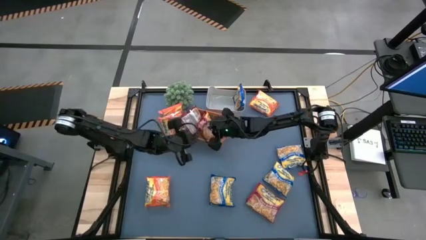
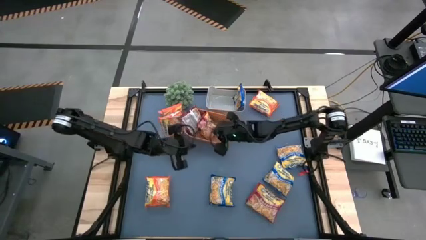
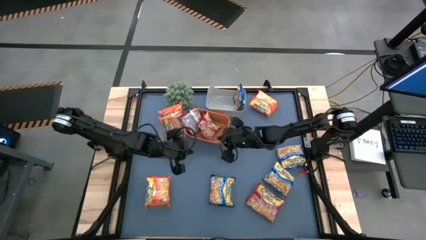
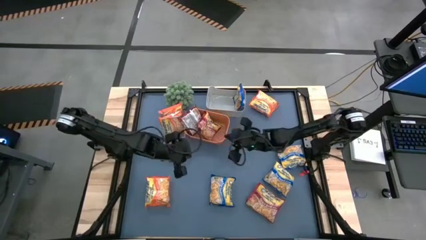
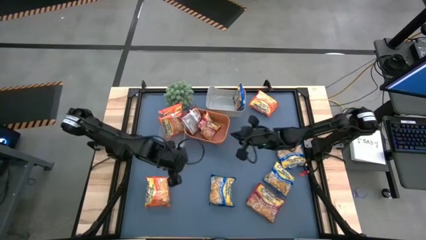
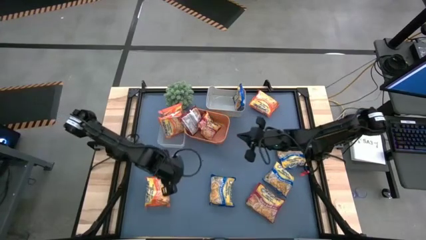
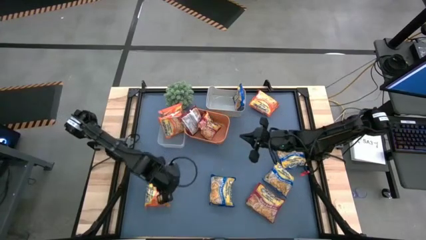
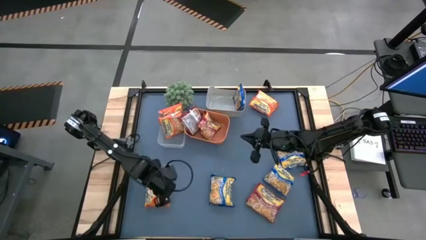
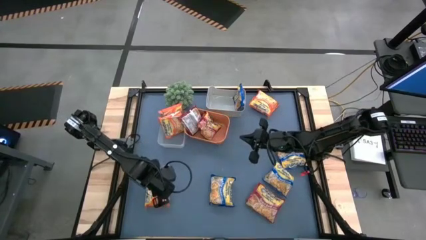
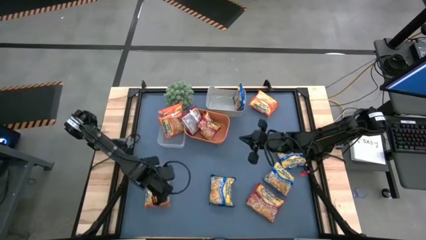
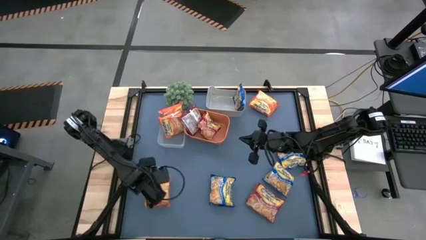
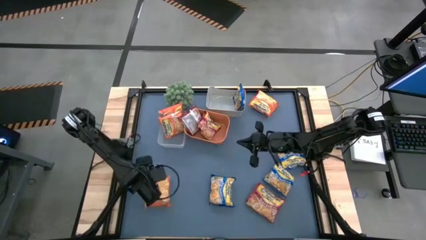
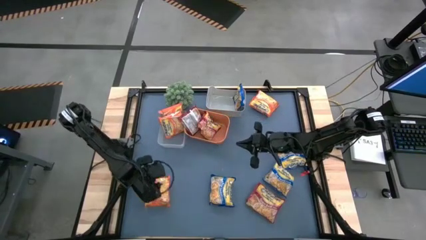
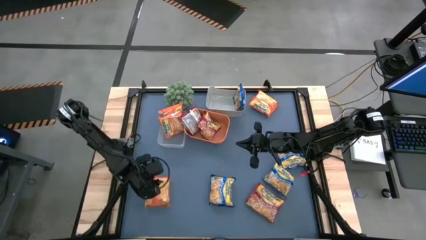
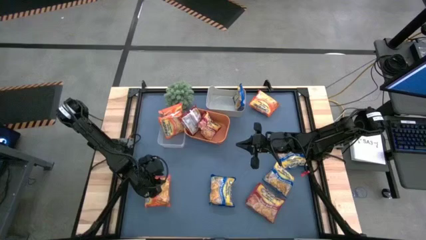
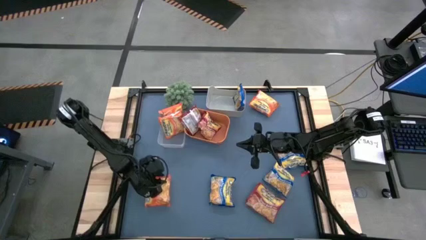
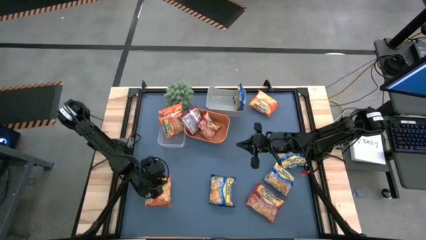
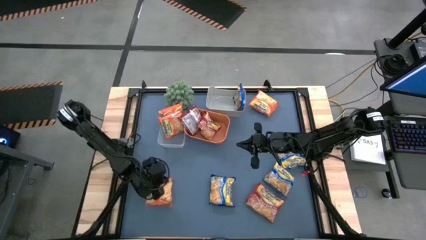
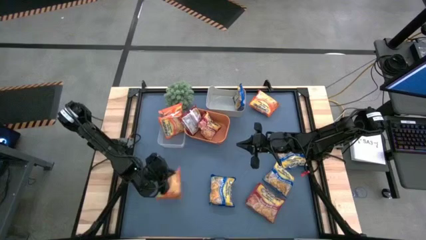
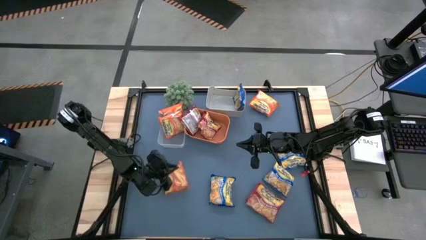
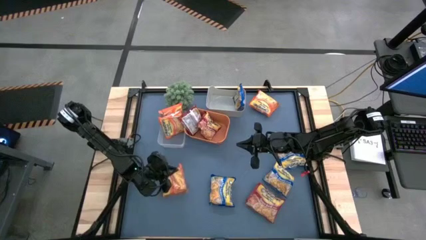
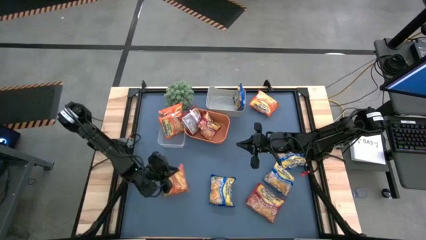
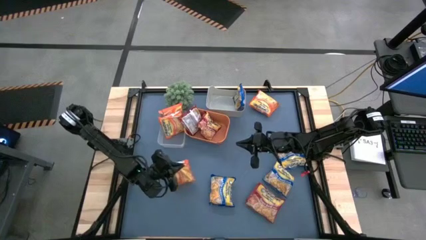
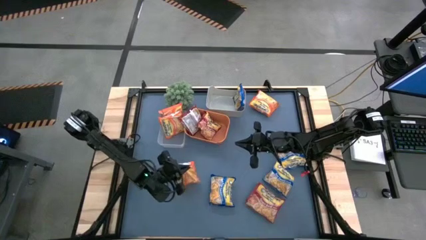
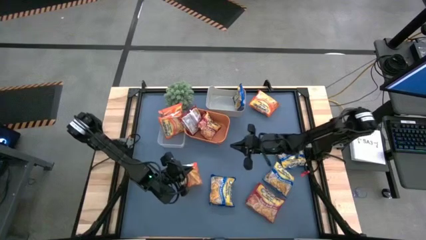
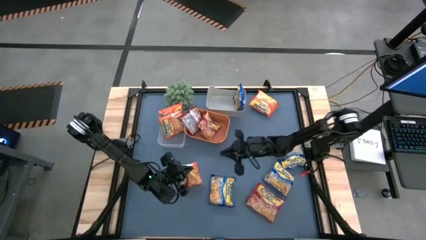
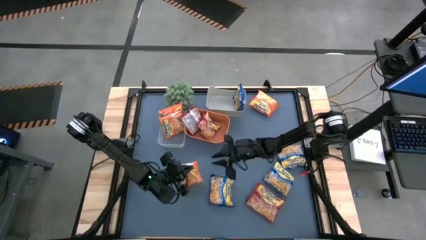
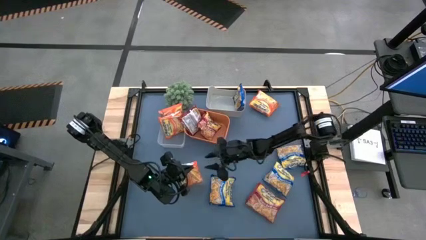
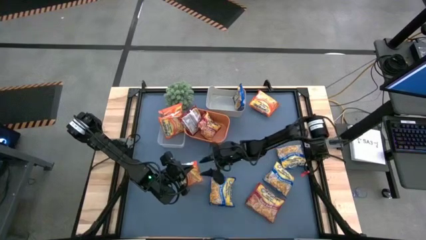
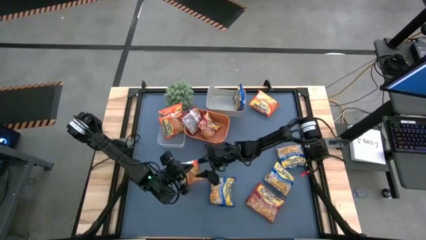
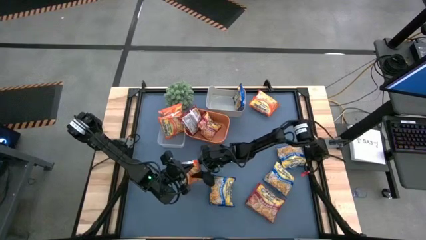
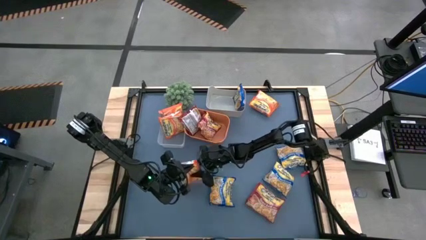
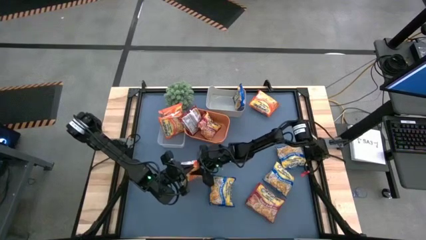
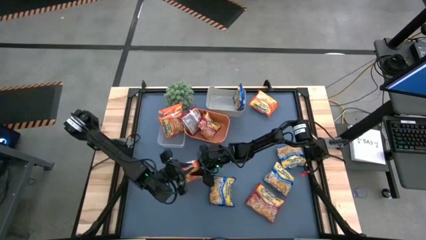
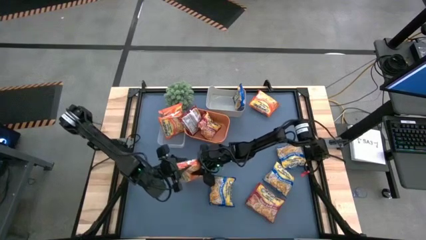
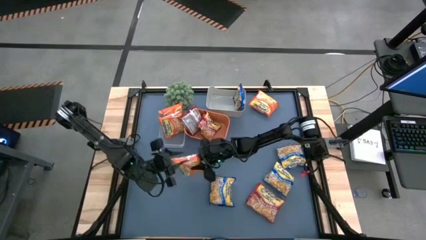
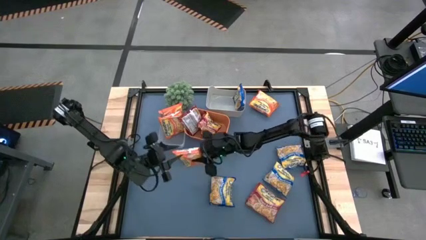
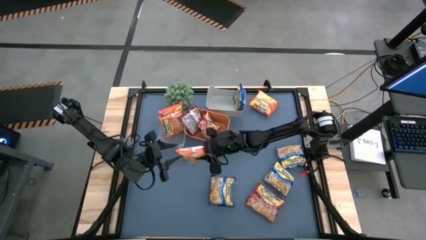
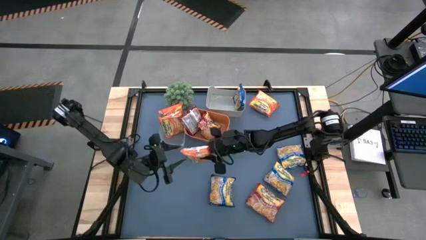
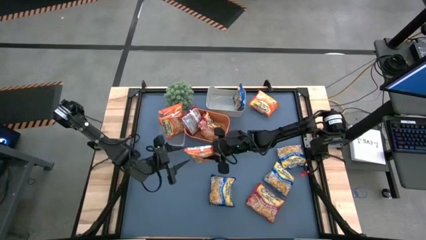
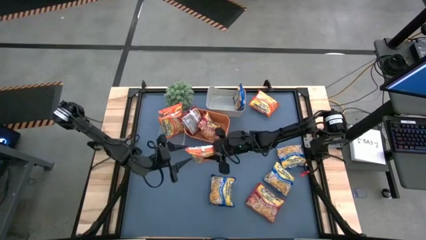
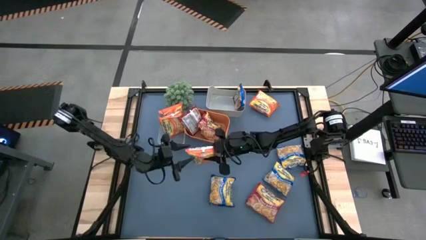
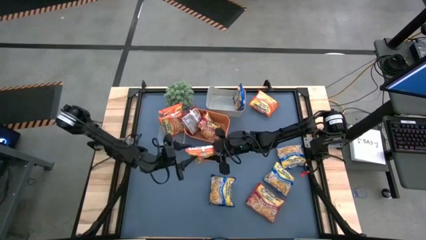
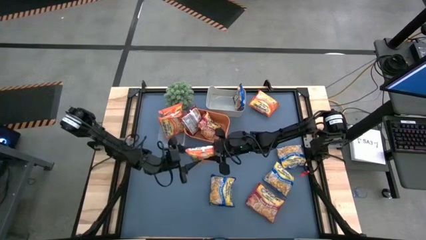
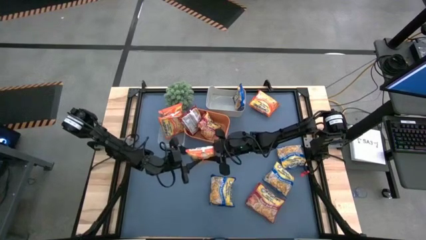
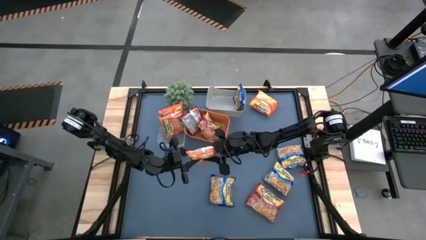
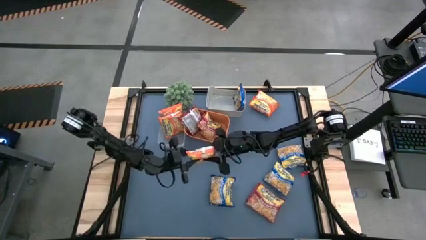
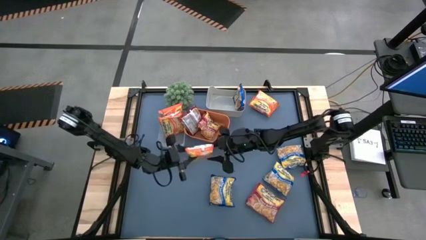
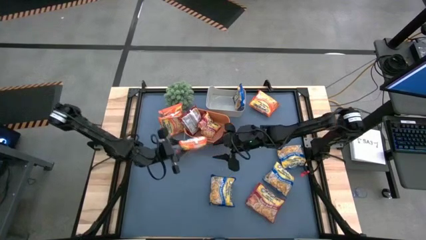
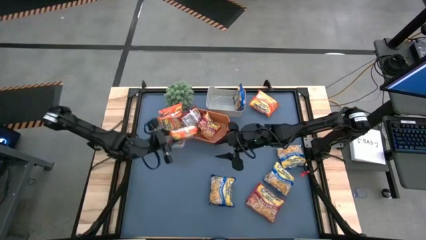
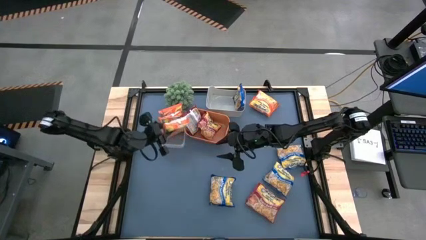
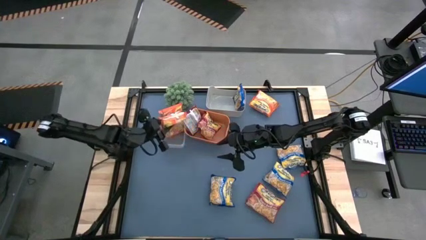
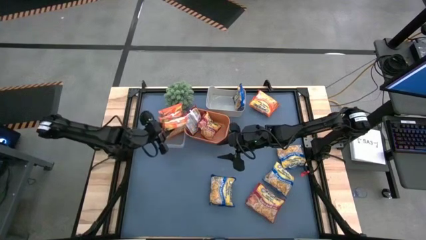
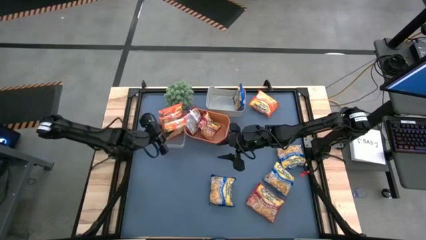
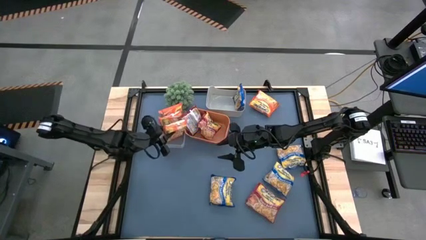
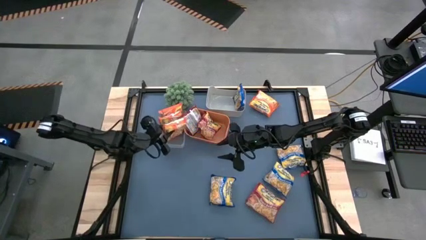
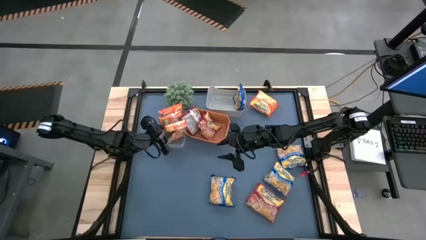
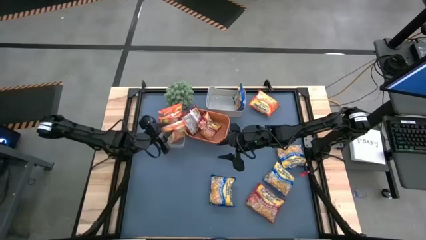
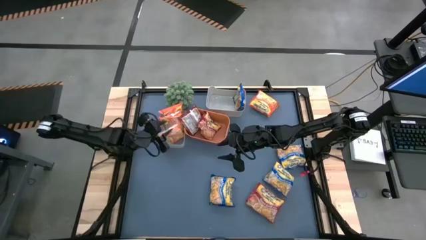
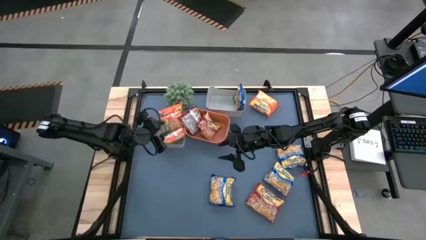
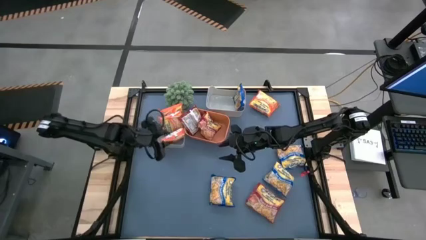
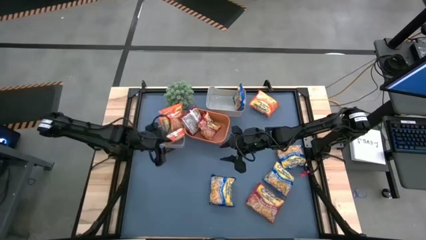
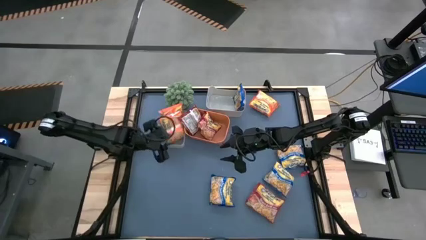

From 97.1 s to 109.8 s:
Task: Sort Maruchan noodles
Put the orange noodle pack into the orange bin

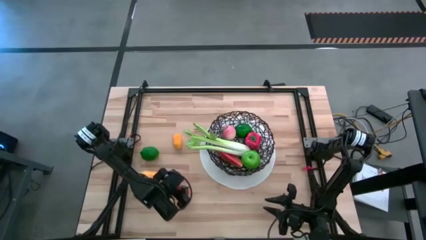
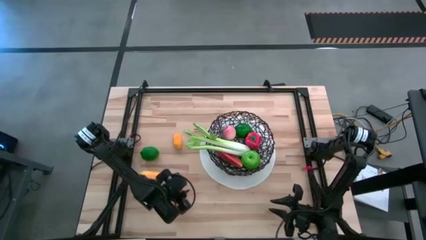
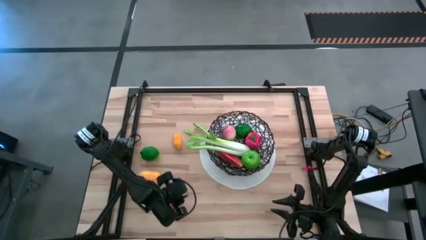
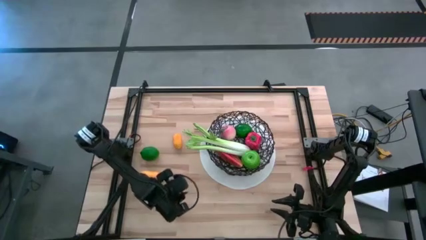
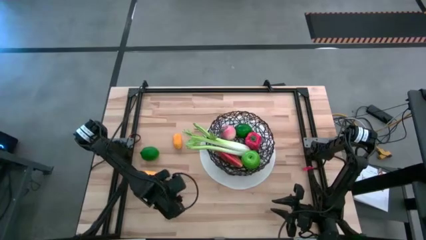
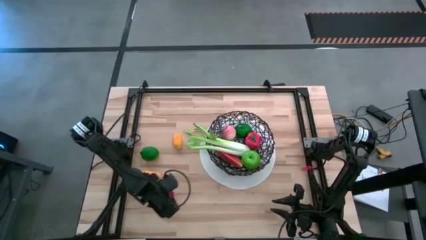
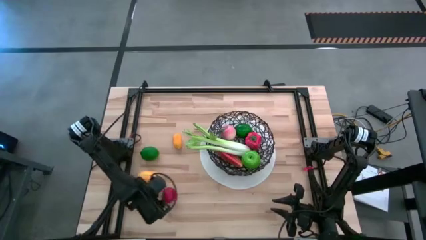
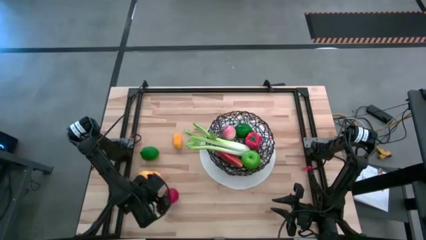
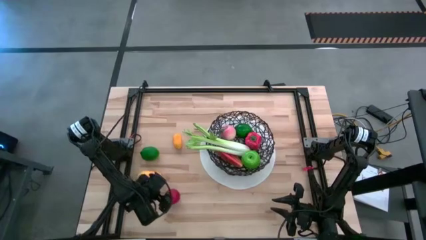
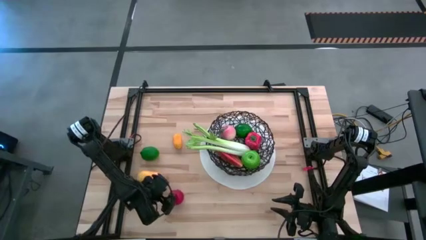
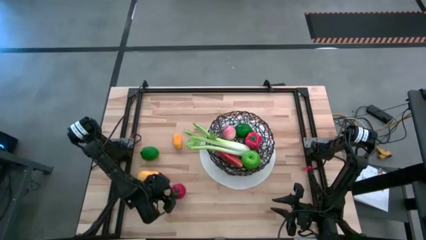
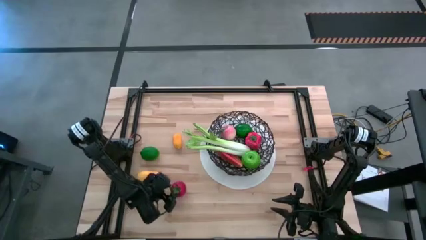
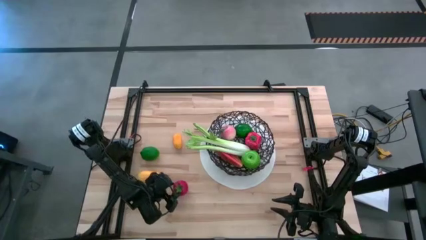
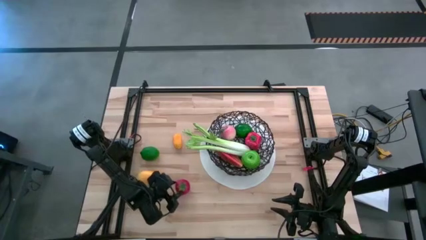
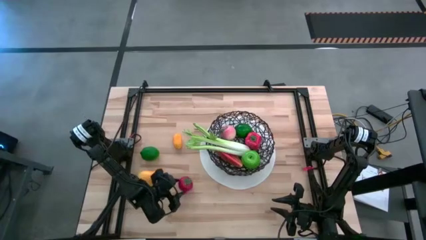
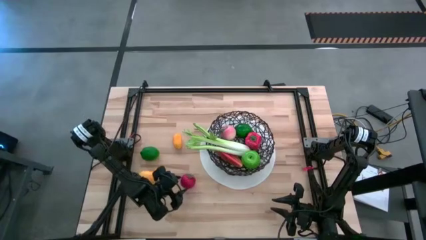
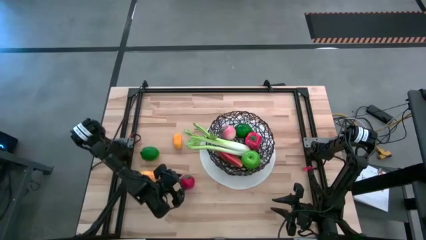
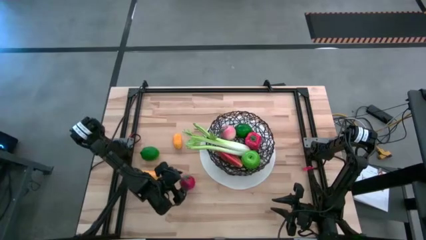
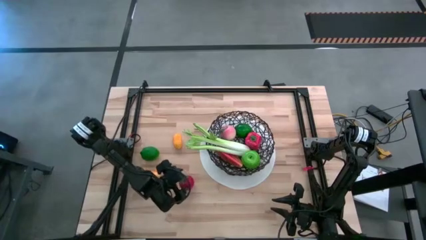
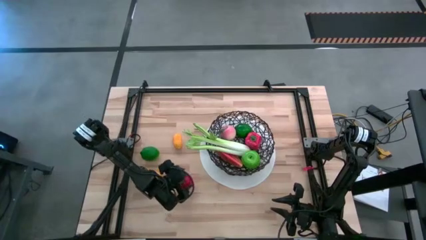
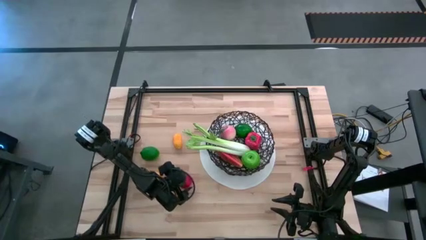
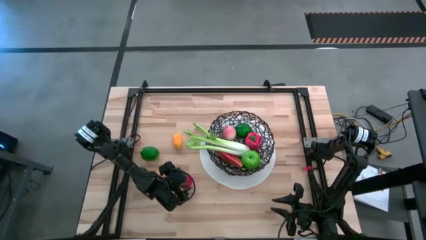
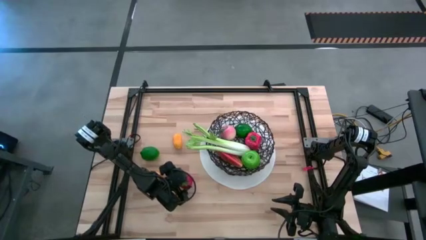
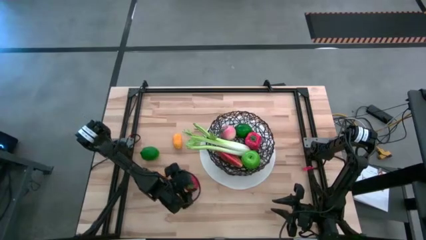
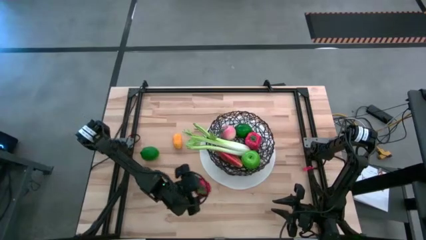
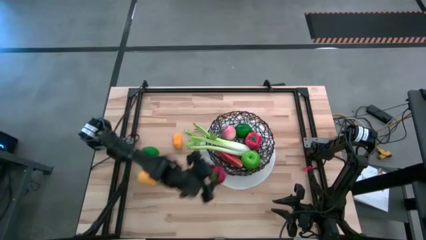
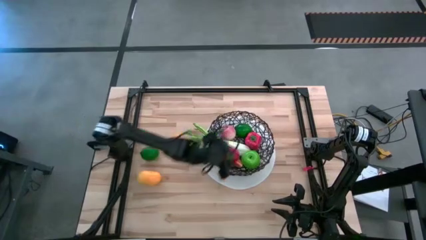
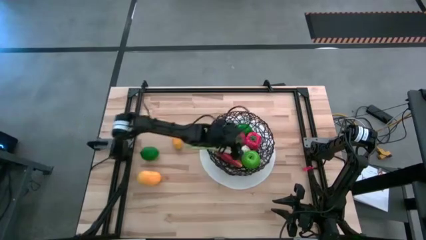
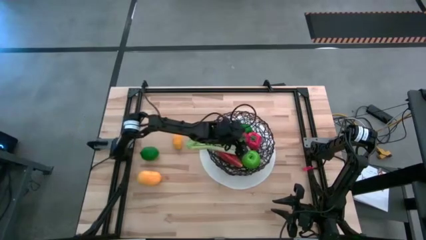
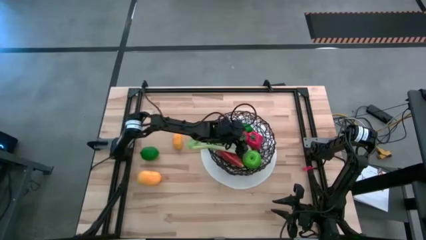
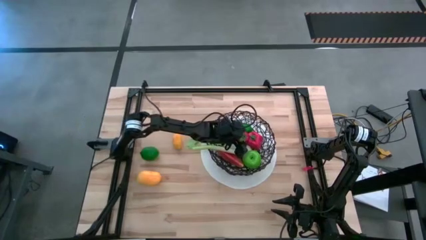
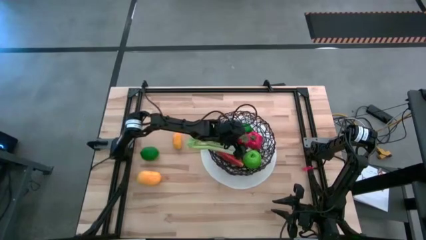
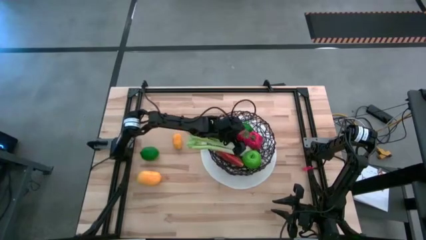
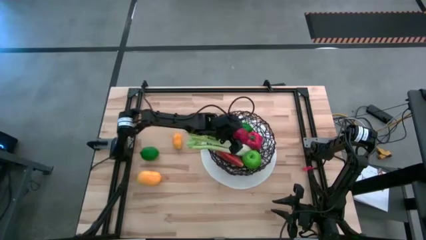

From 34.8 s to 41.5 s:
Task: Build produce basket
Put the red tomato into the wire basket
